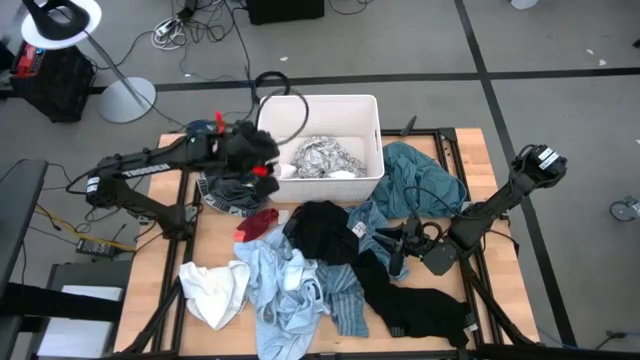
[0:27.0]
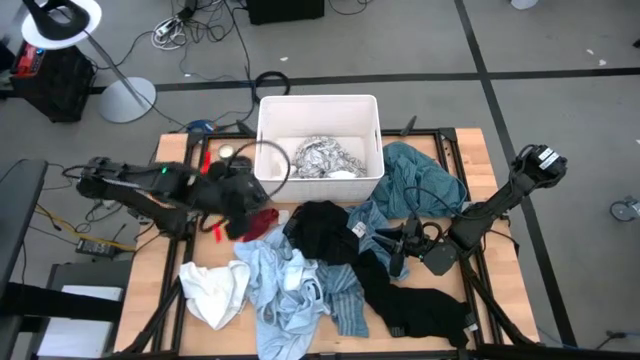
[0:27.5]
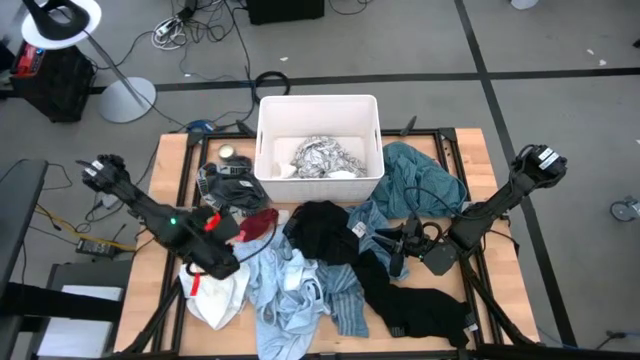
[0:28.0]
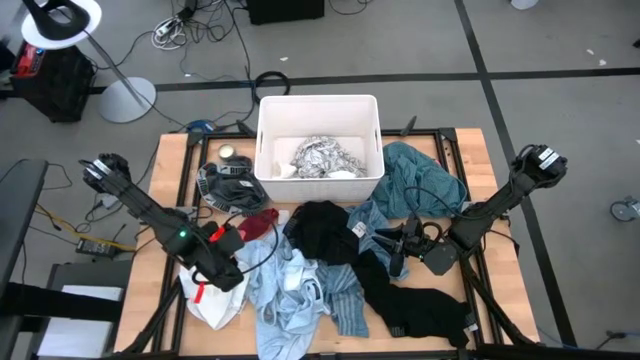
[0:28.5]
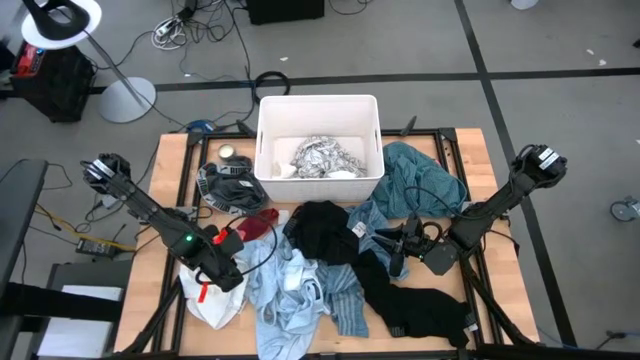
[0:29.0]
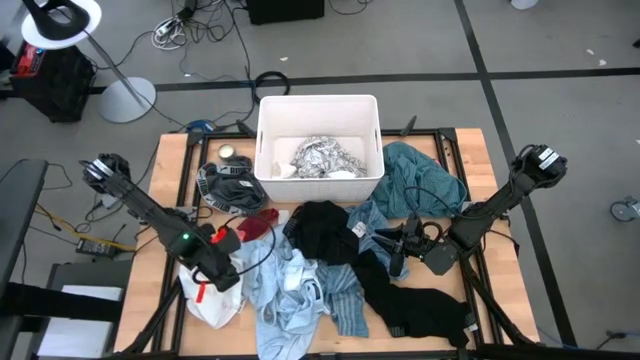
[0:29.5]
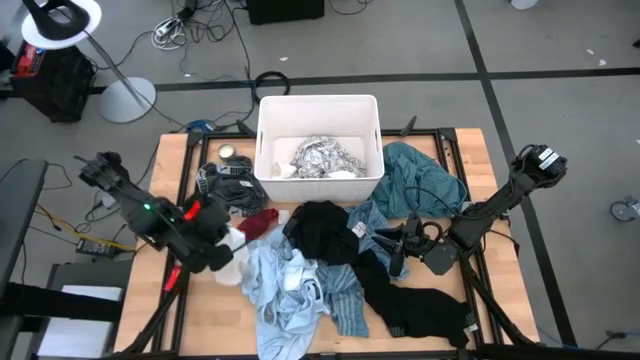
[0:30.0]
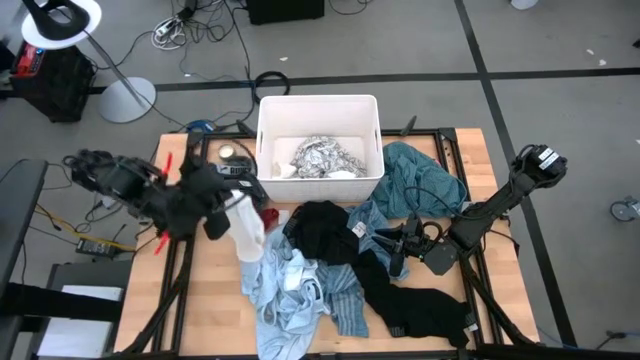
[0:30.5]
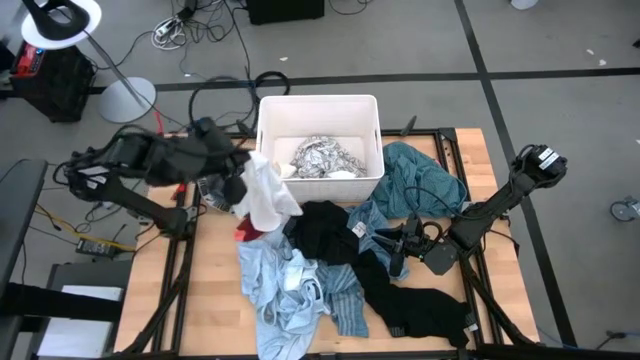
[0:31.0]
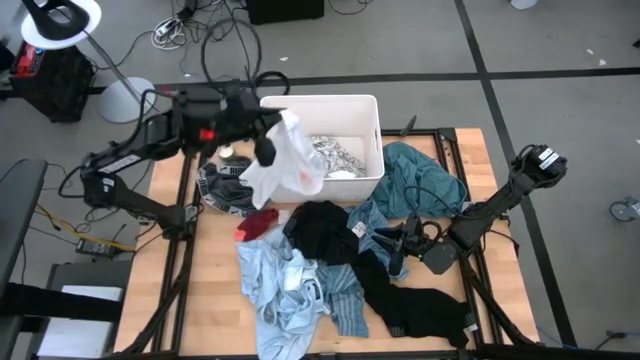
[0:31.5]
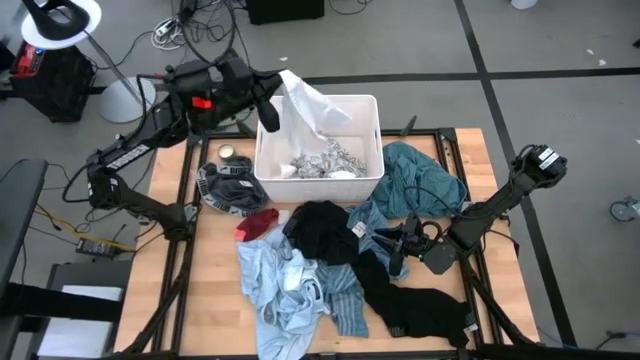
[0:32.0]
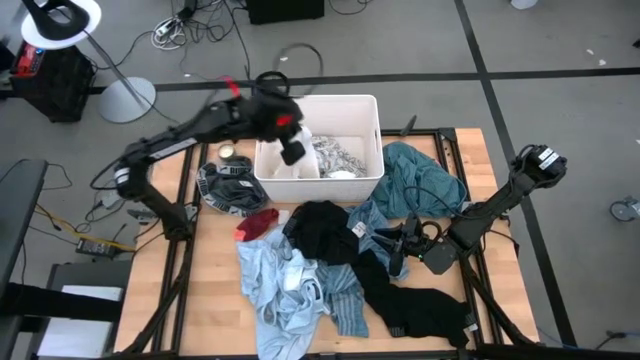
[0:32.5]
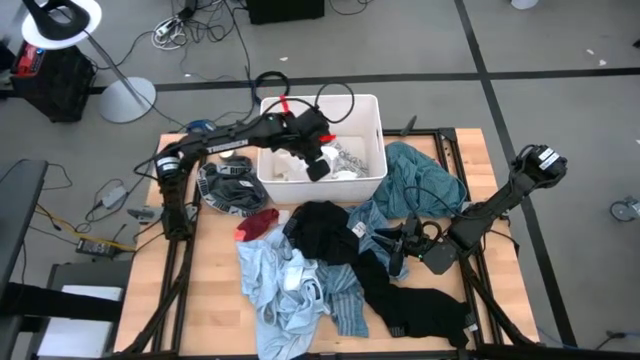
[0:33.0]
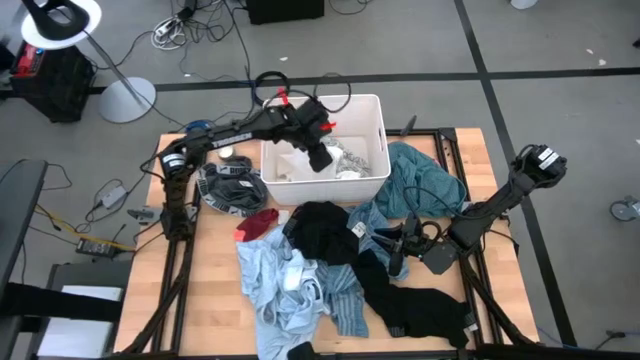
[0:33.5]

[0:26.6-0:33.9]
Task: Sort clothes
Put the middle left white boxers into the laundry bin

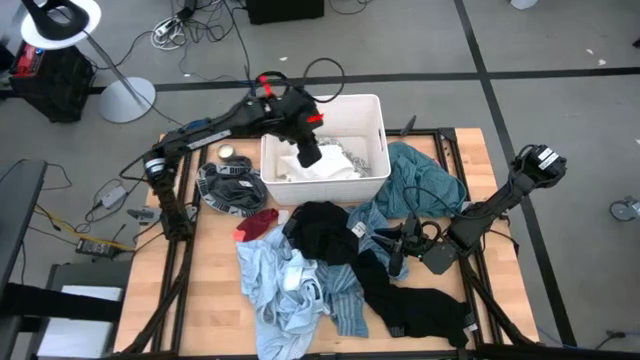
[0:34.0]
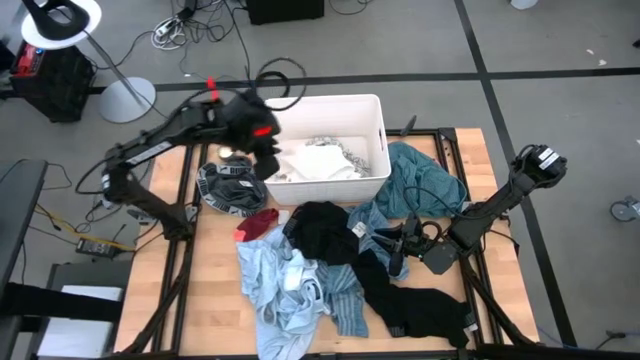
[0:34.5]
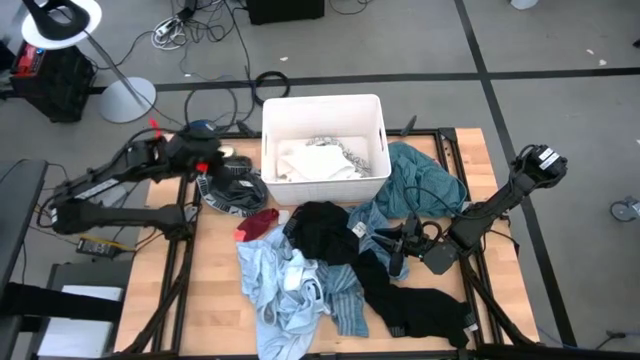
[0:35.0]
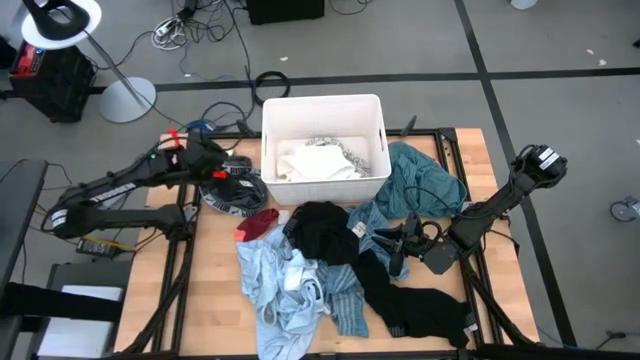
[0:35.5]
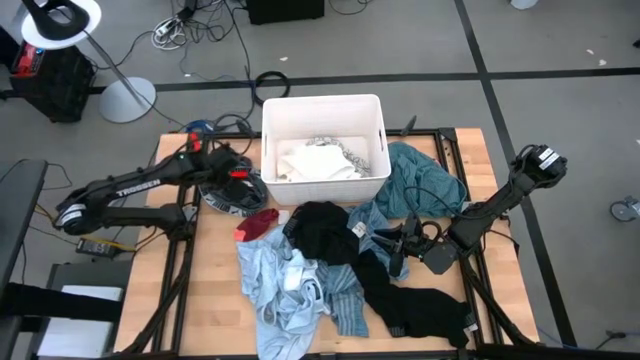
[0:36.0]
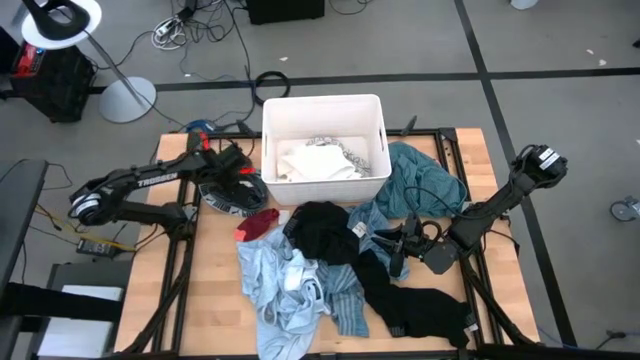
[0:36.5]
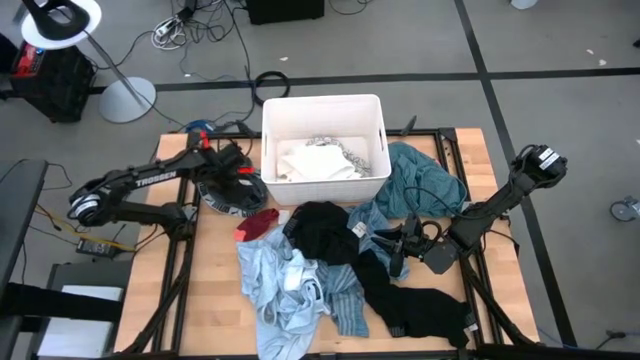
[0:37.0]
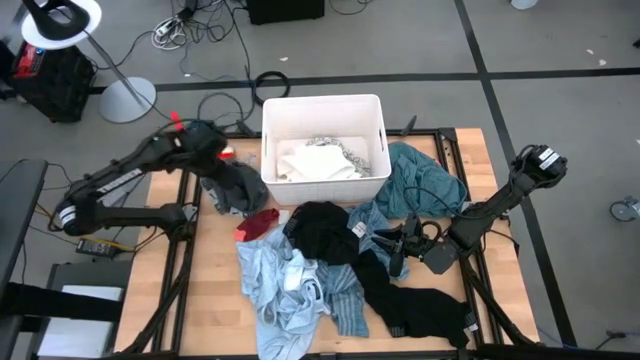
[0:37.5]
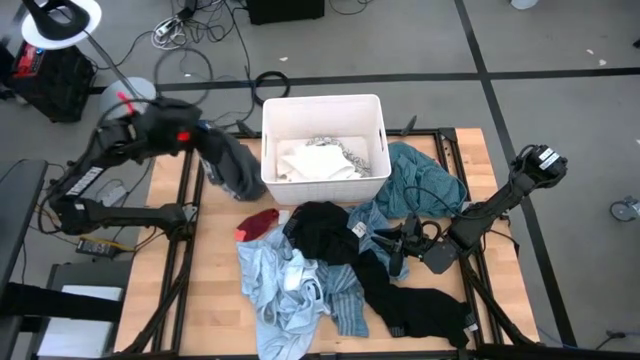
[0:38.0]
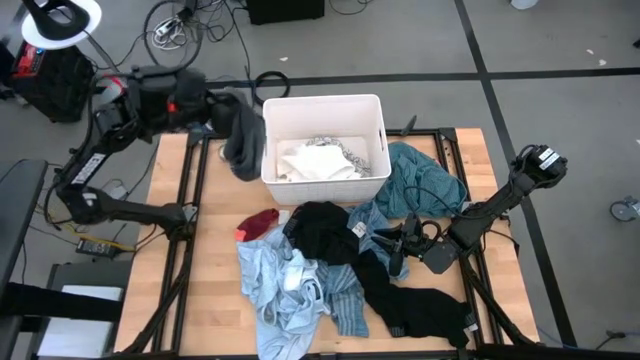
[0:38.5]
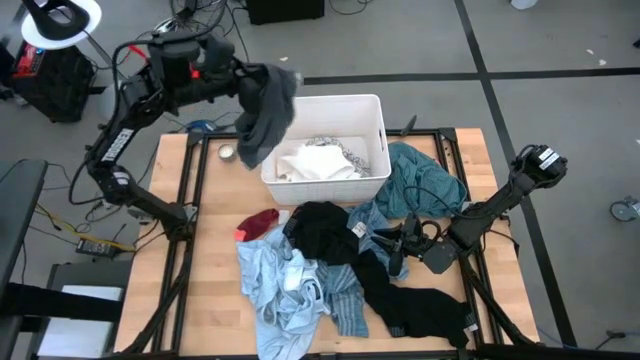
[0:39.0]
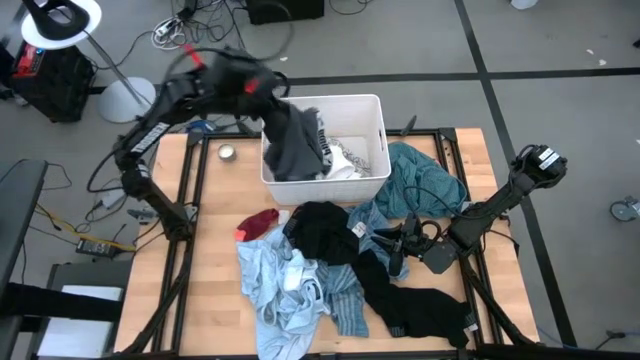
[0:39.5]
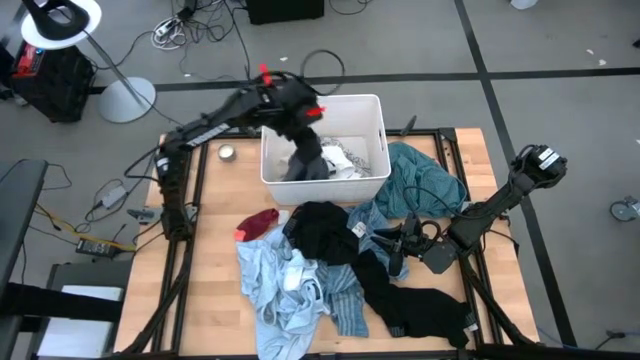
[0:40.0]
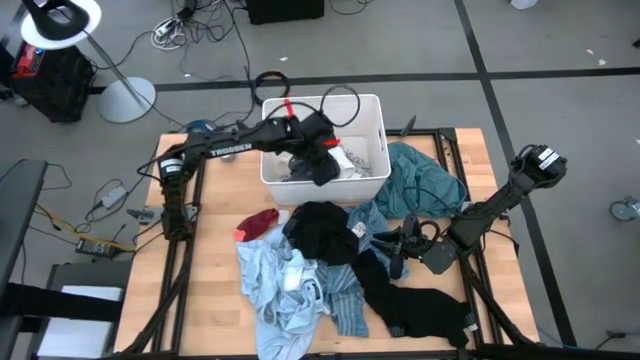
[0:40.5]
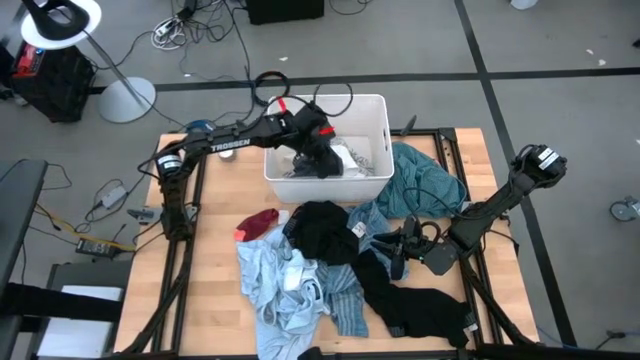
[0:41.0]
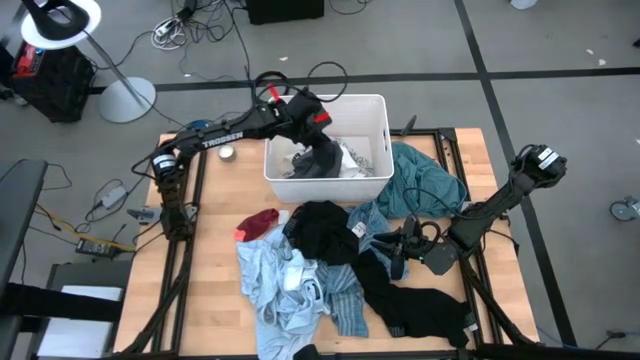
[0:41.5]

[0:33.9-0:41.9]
Put the top left gray boxers into the laundry bin

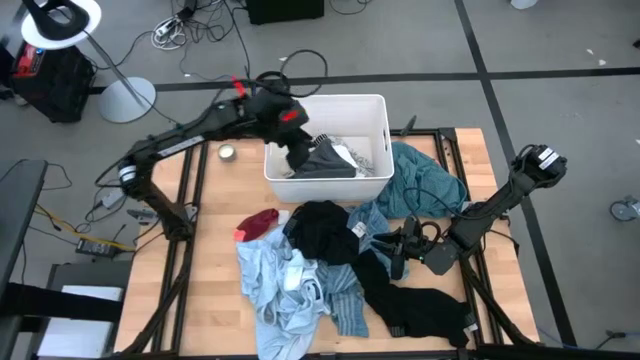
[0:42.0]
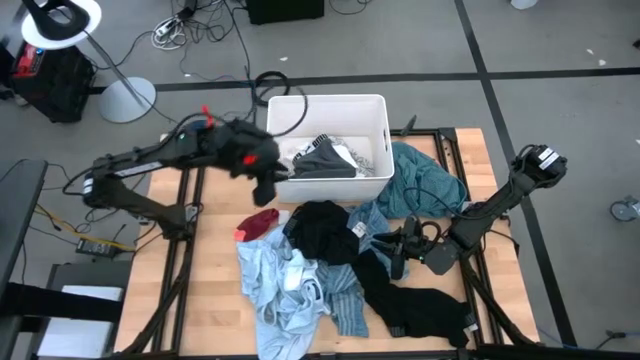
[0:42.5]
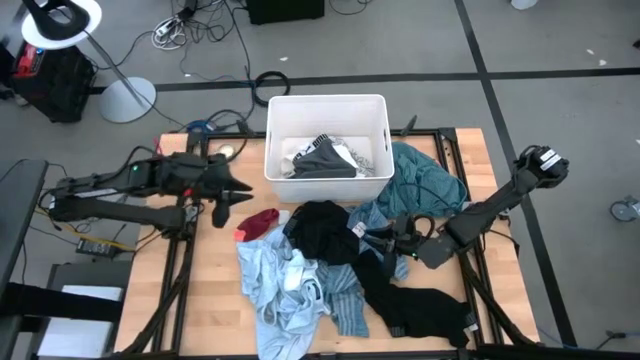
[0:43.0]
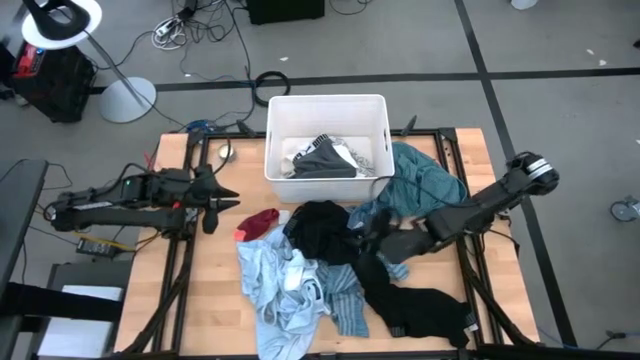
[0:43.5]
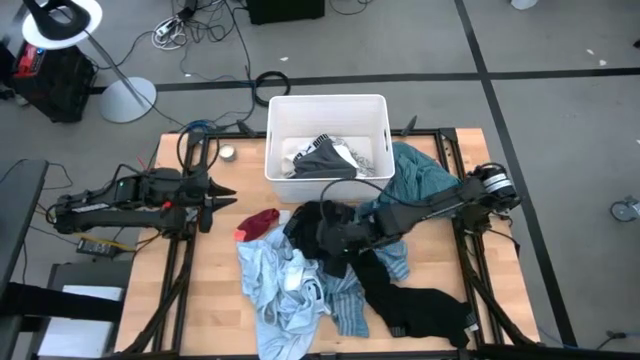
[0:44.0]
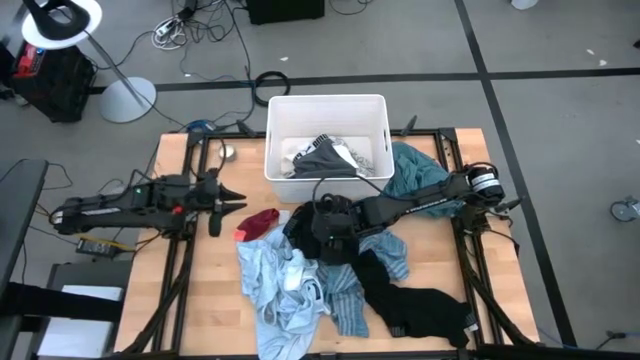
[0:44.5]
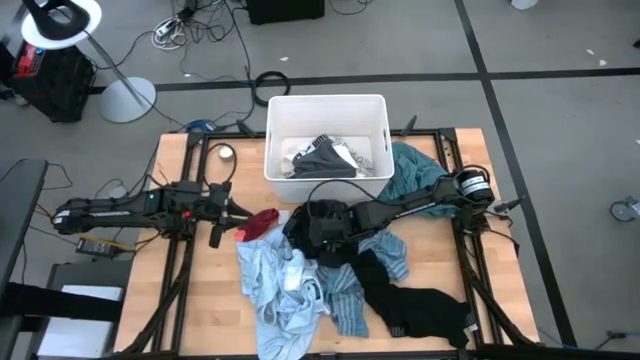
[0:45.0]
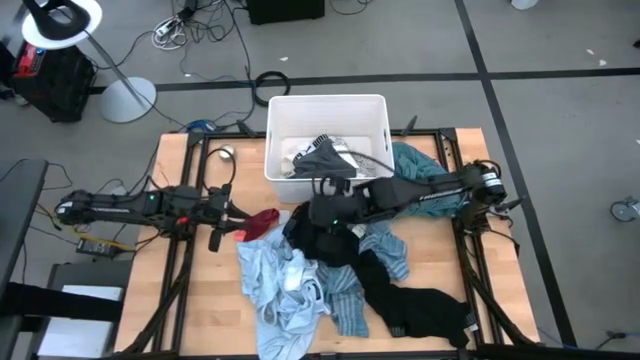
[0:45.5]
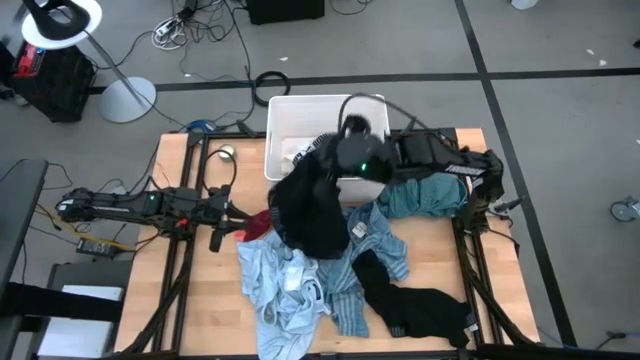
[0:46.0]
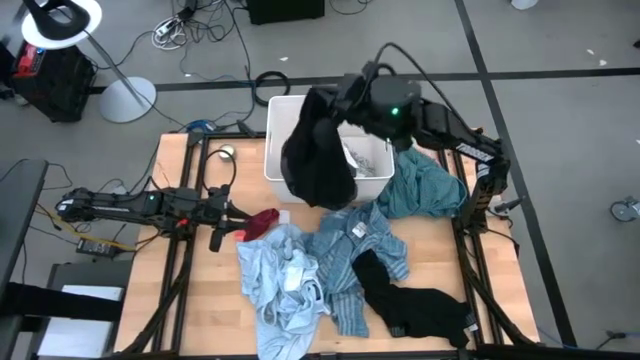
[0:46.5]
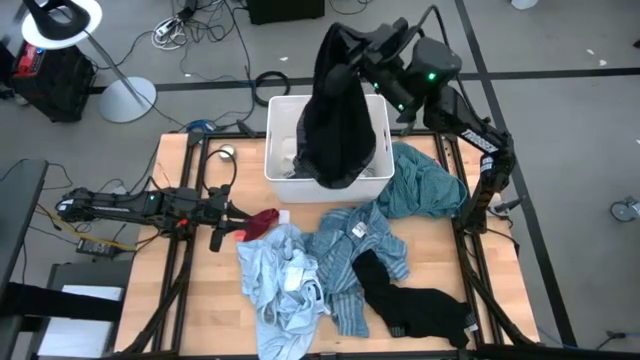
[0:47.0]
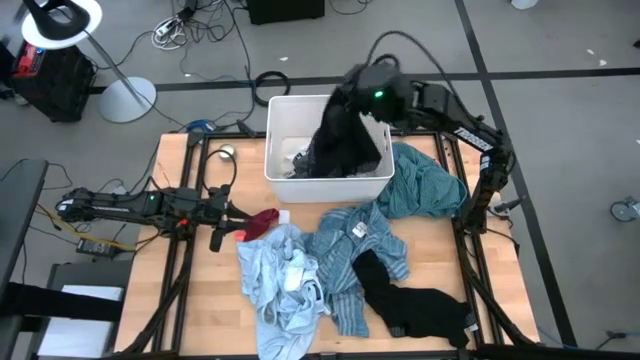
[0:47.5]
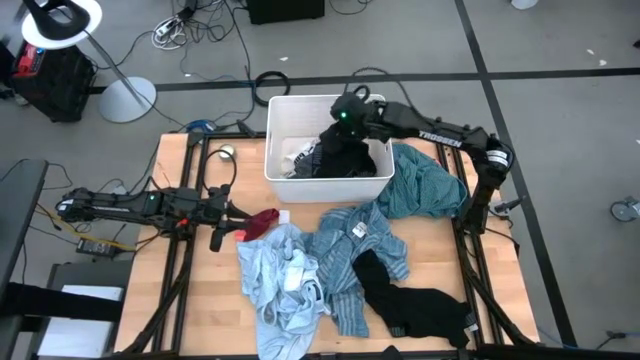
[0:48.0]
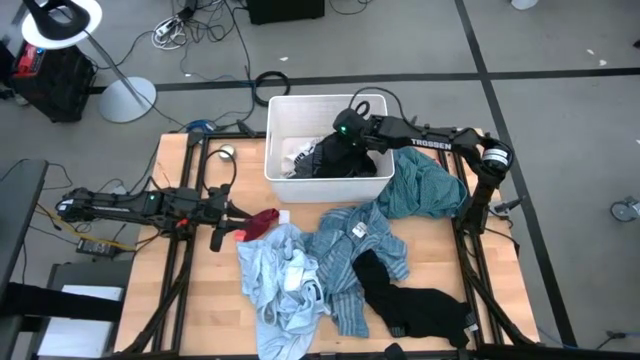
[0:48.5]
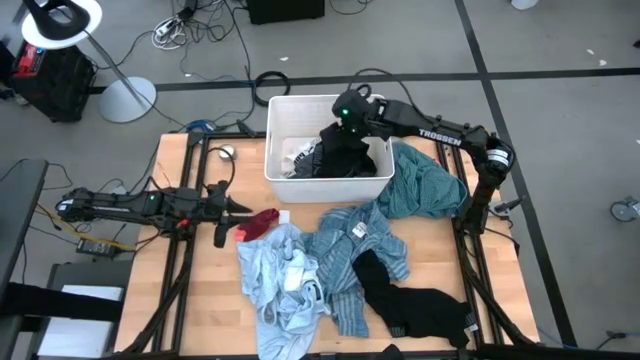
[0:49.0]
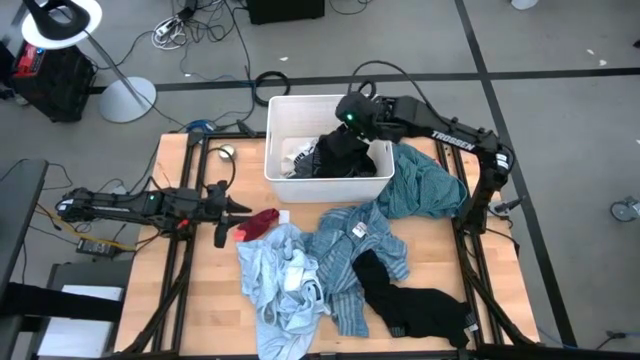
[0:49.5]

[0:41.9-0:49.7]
Put the top black boxers into the laundry bin
